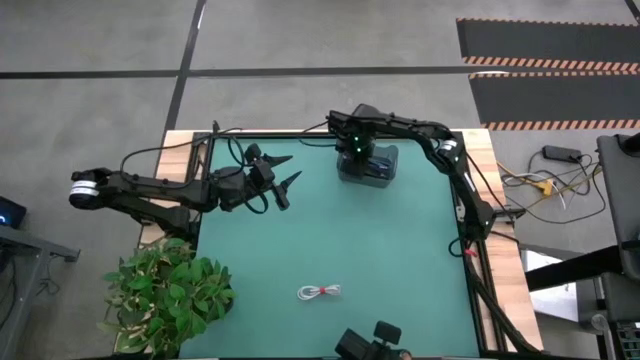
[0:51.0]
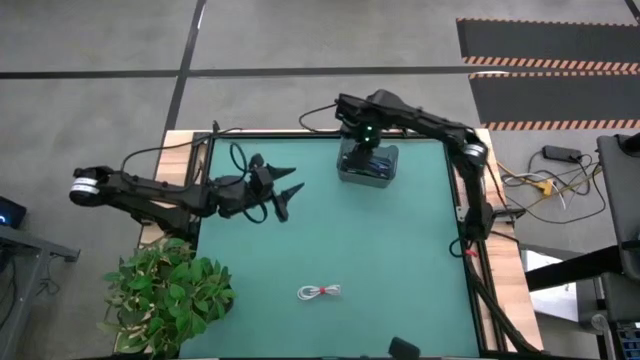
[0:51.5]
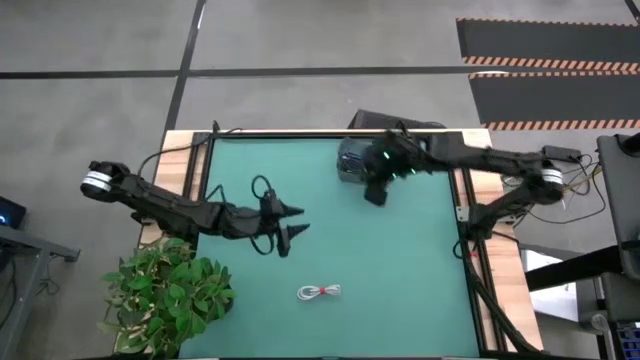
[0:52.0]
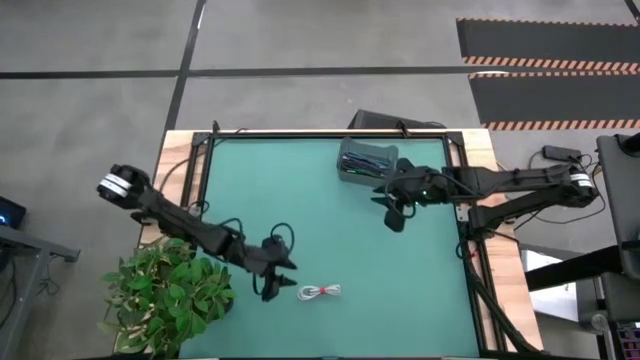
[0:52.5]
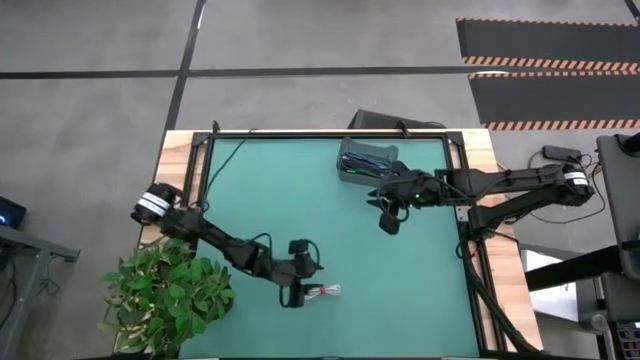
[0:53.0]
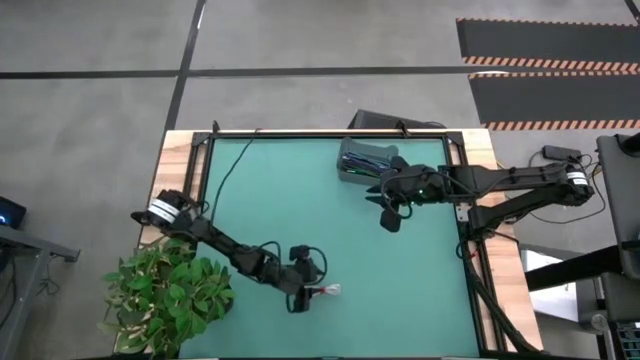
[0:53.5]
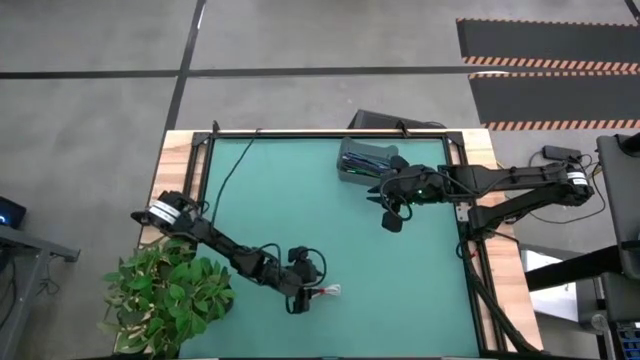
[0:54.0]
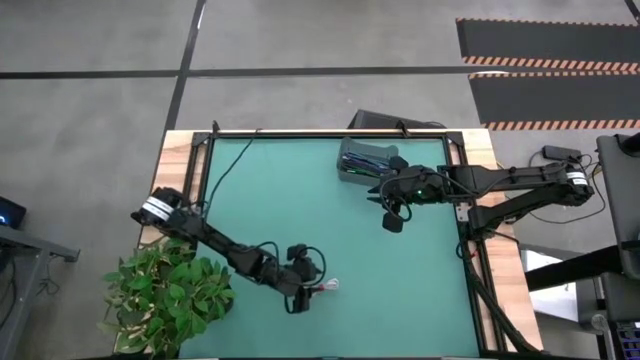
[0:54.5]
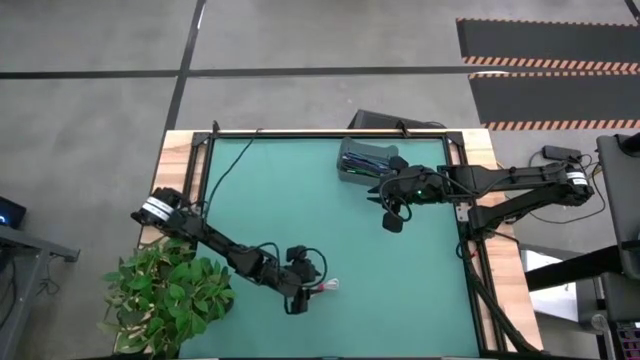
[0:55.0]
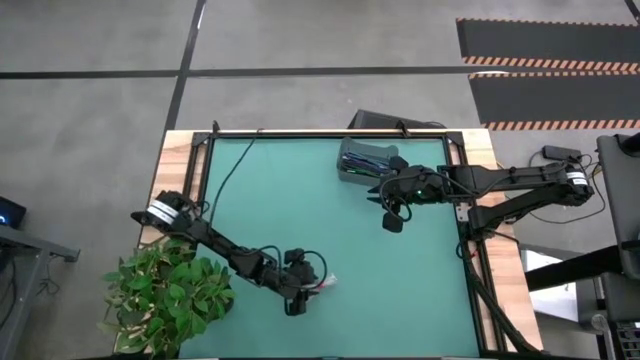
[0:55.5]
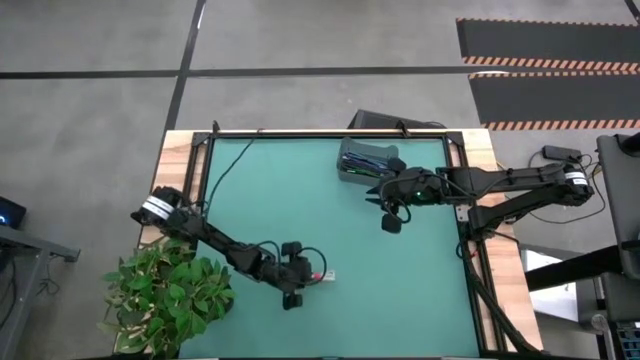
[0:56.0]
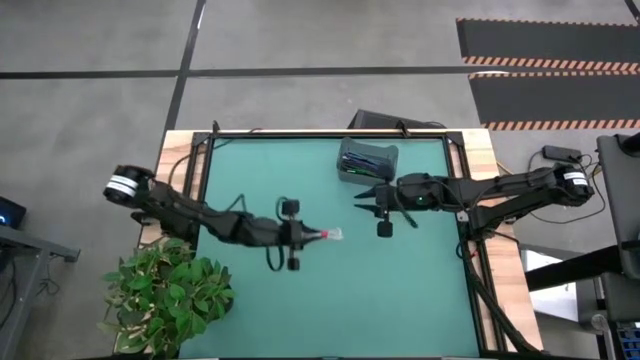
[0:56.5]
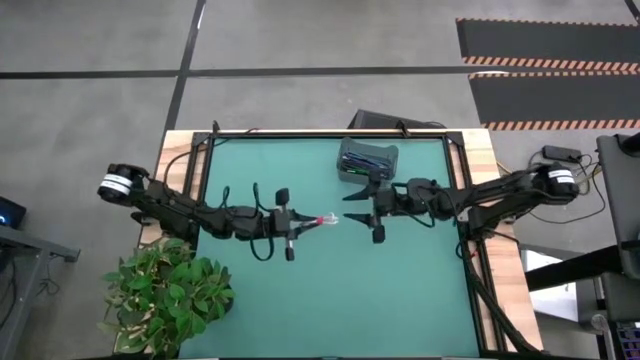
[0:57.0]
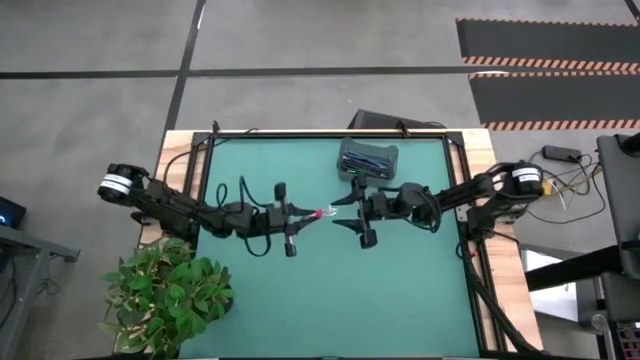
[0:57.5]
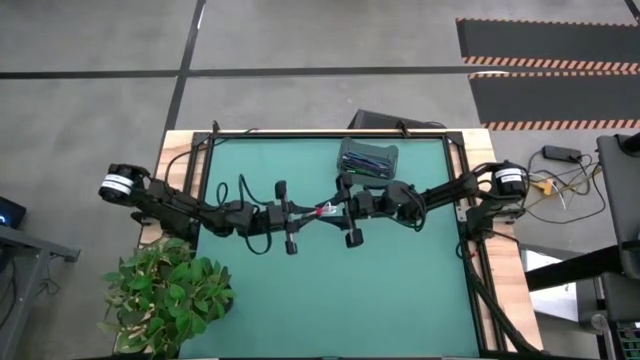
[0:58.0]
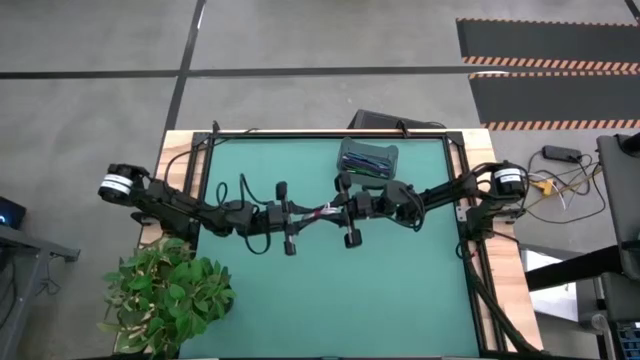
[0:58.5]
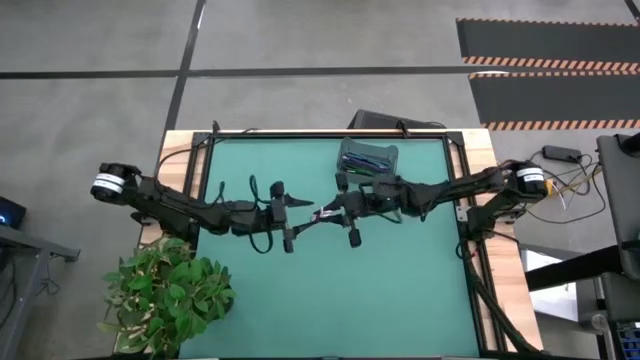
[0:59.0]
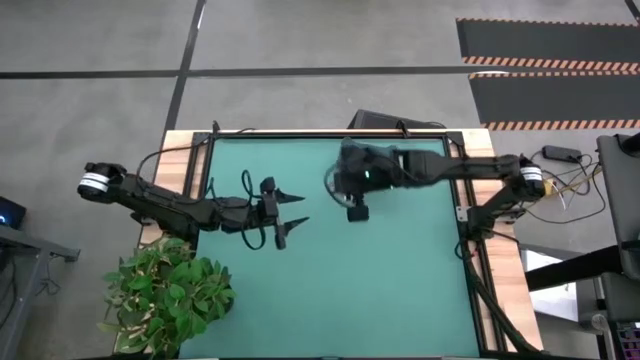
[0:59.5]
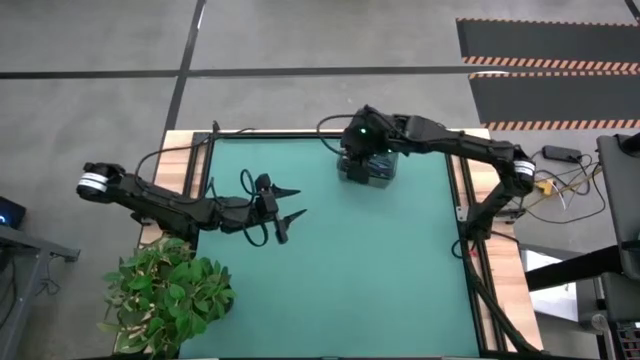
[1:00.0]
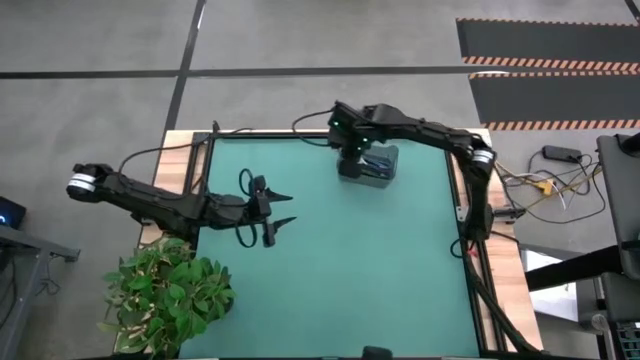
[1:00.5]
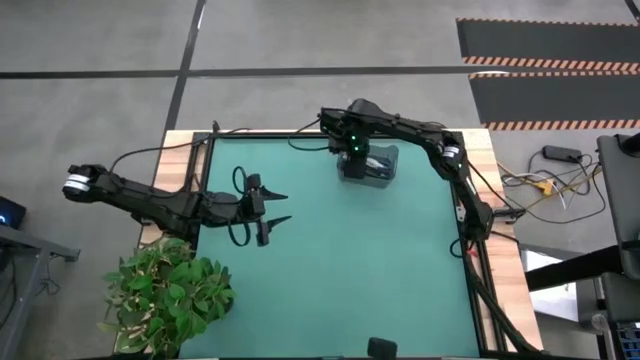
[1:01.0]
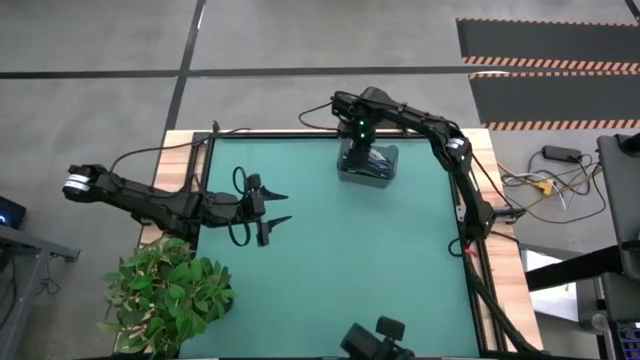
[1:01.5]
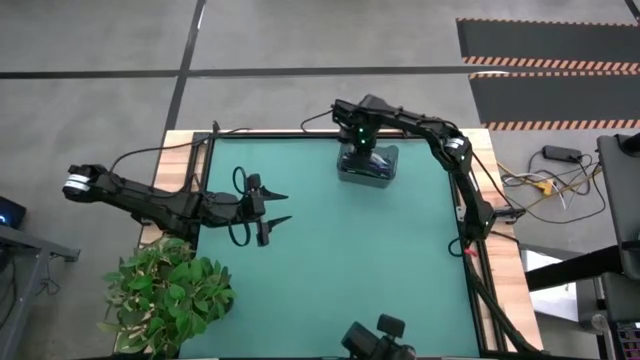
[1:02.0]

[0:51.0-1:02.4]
Task: Pick and place USB-C Cables
Put the white cable into the black bin

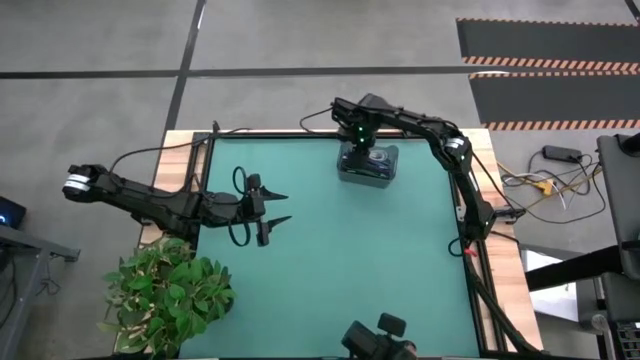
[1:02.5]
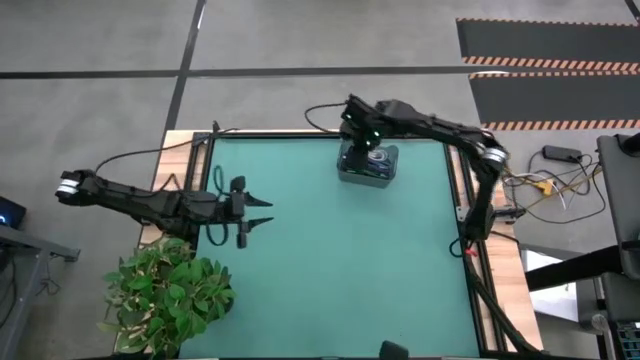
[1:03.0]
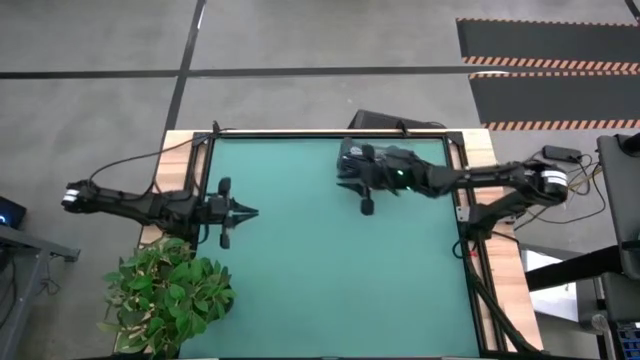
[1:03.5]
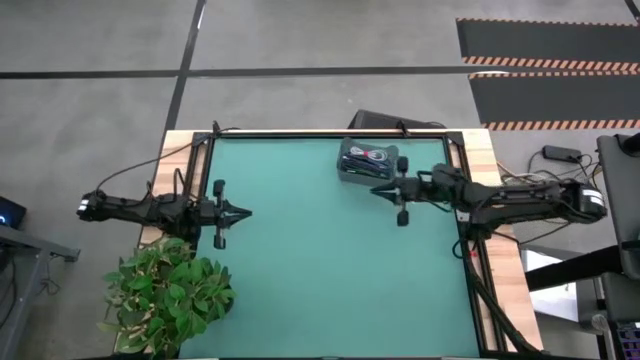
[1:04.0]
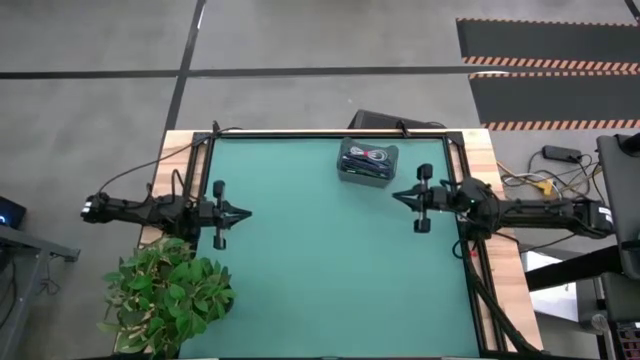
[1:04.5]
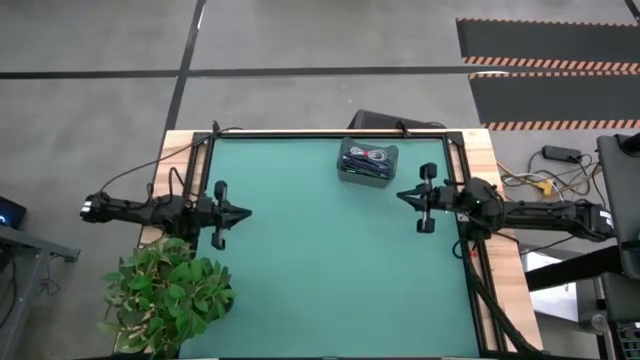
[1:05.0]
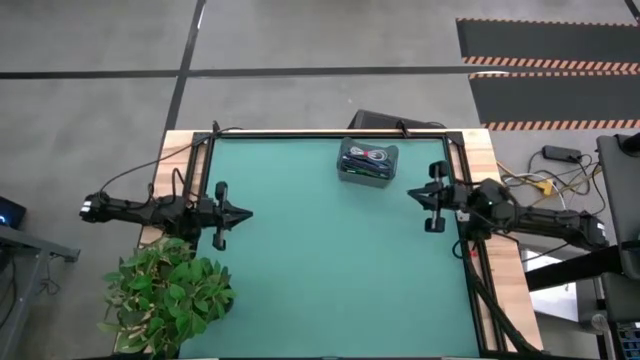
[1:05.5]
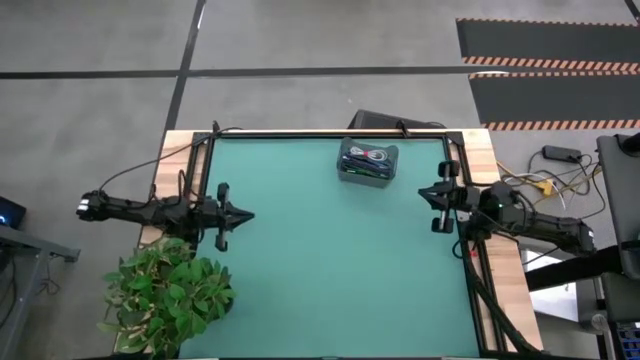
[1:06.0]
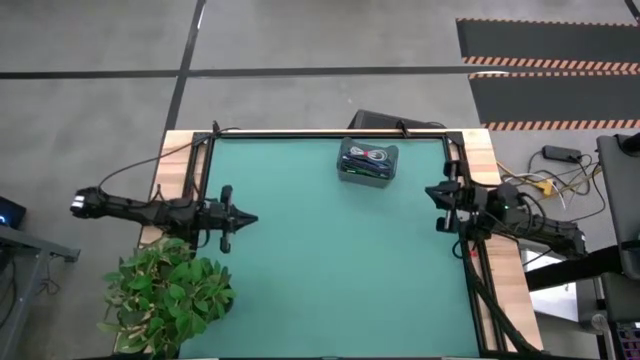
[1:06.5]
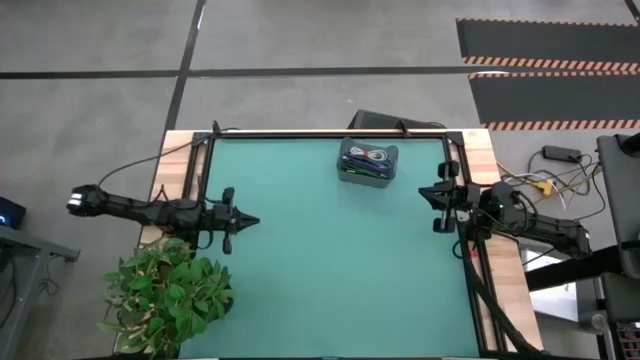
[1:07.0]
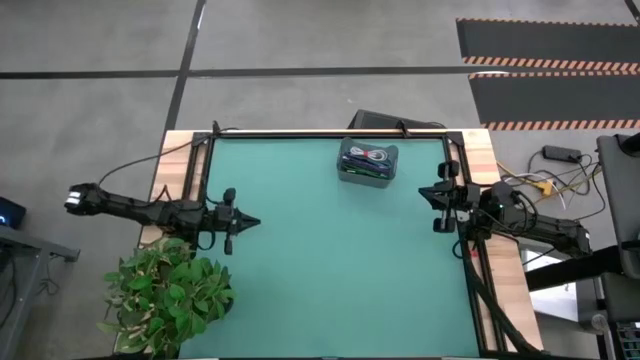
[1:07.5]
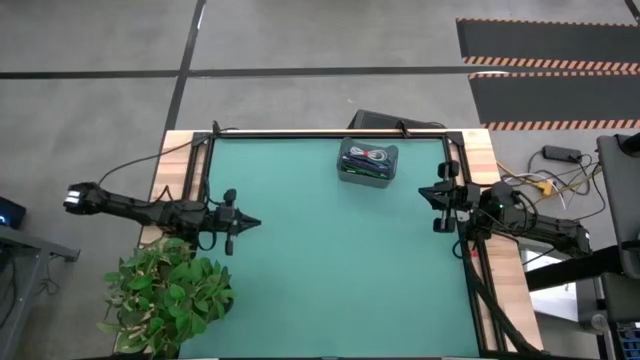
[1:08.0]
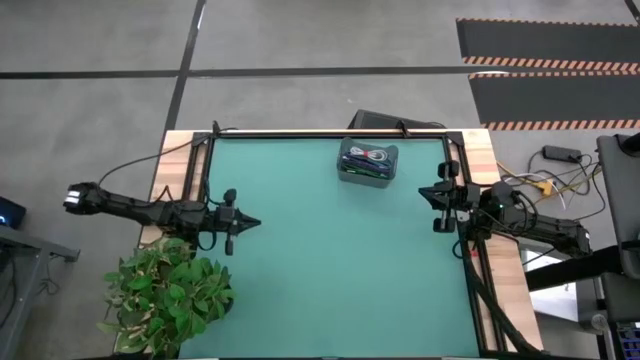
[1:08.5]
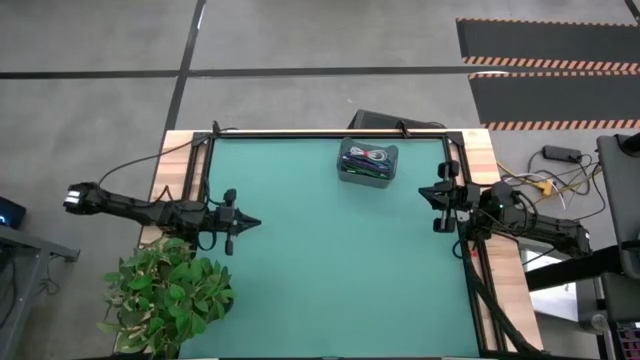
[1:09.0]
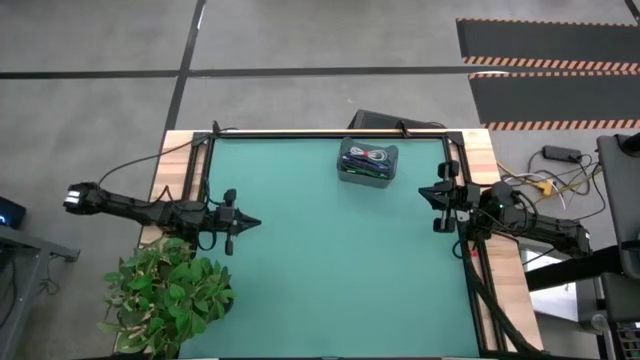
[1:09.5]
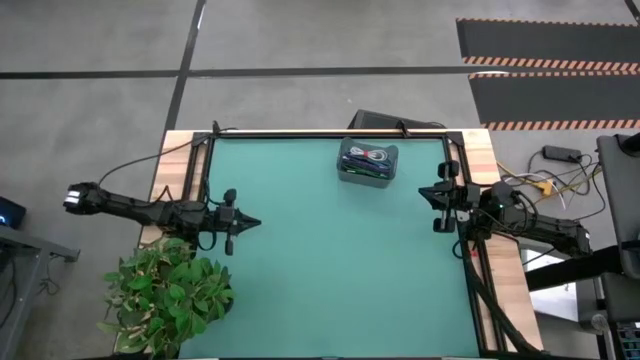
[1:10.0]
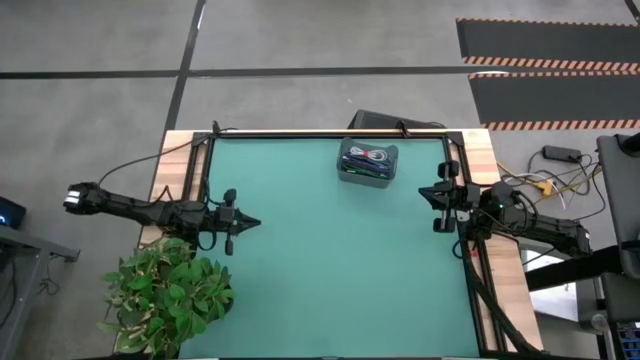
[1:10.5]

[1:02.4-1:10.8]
Return to Home Position

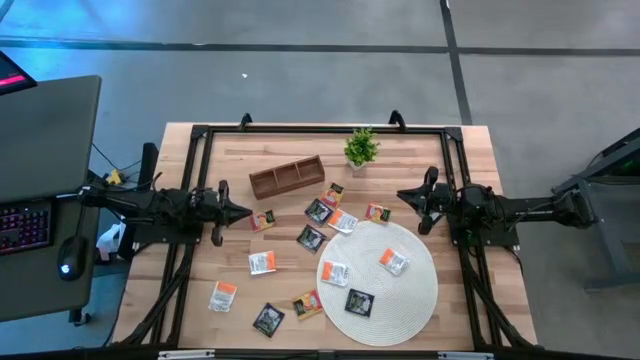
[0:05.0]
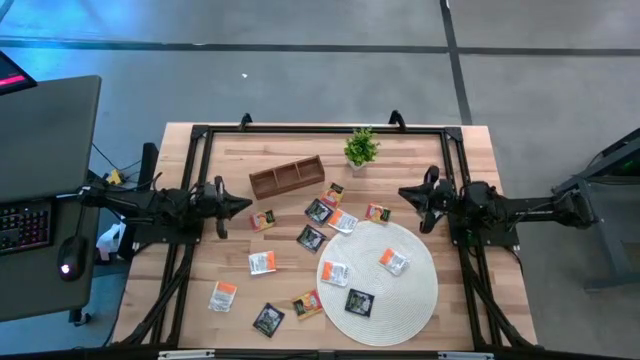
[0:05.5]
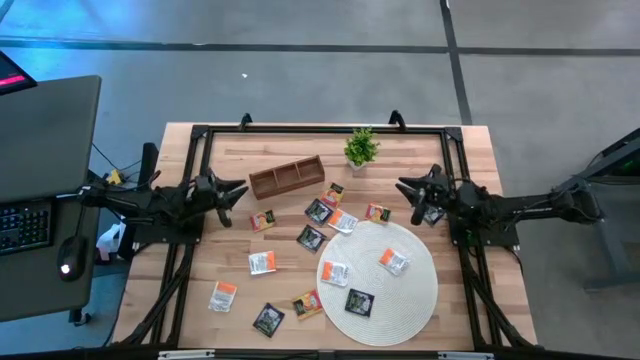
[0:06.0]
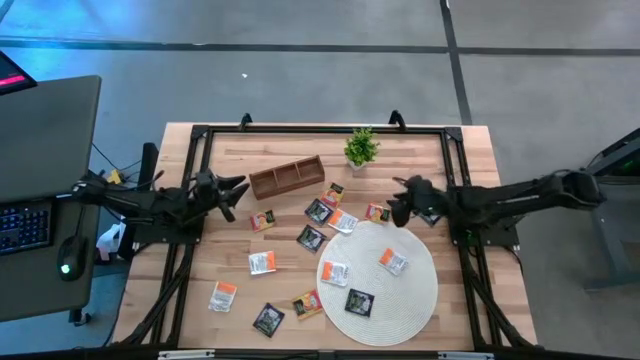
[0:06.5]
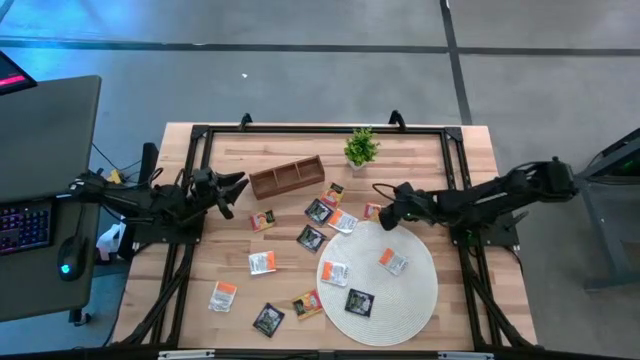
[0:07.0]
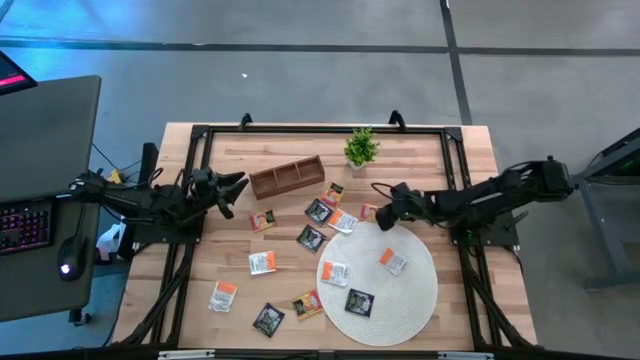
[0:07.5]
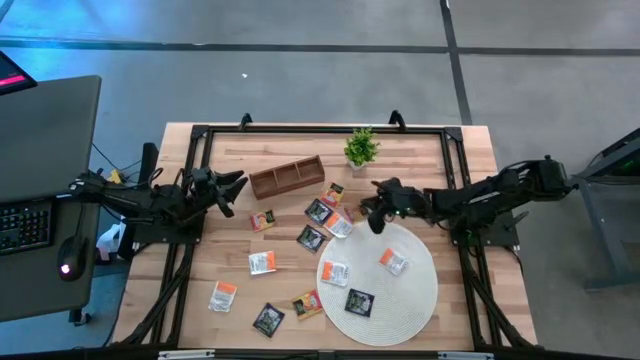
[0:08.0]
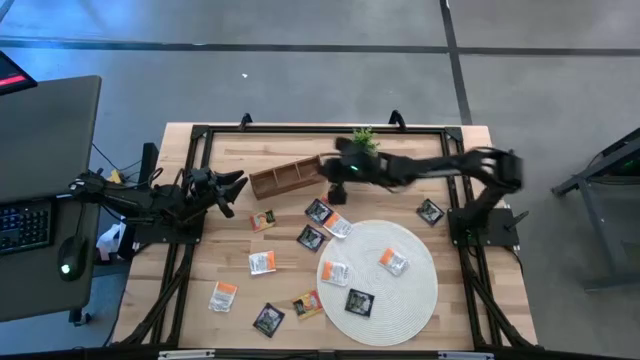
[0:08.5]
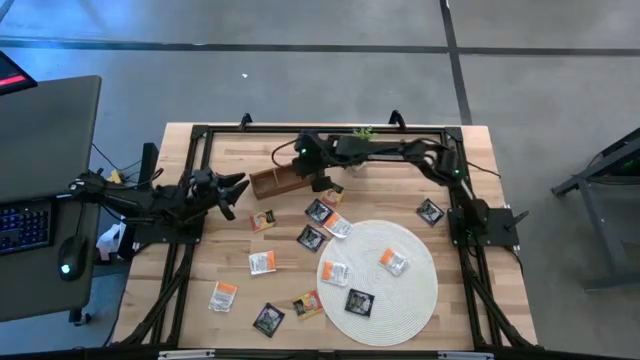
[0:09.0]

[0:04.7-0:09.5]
Task: Pick & Place Tea
Put the orange tea bag into the right section of the wooden organizer
